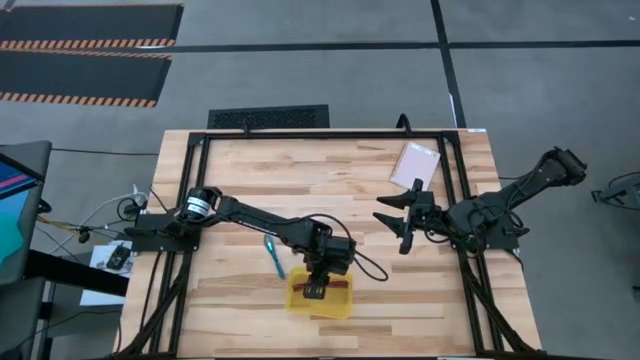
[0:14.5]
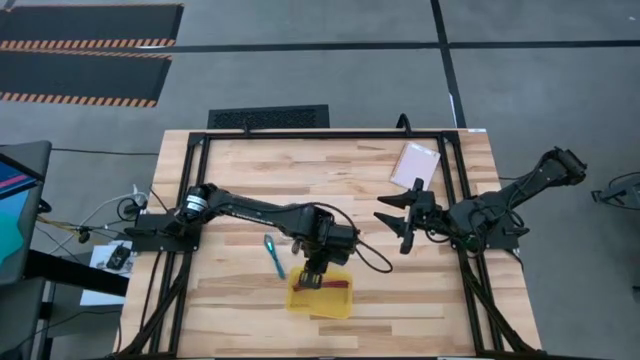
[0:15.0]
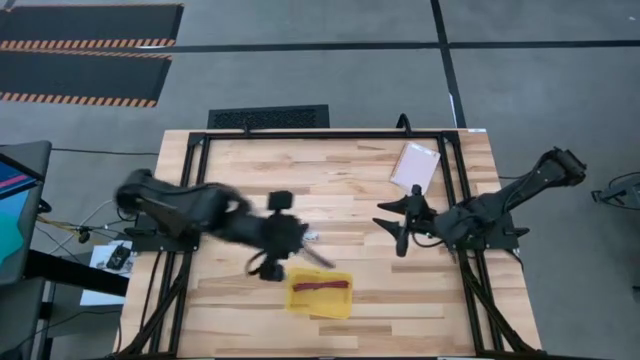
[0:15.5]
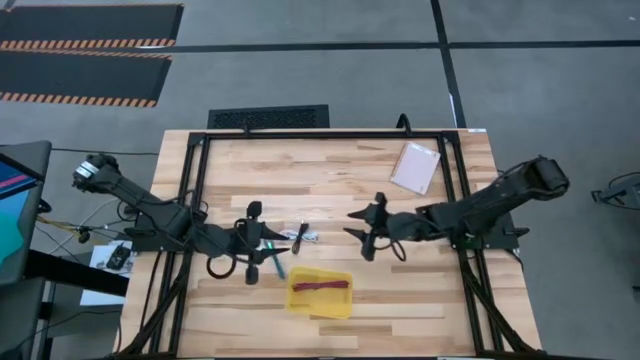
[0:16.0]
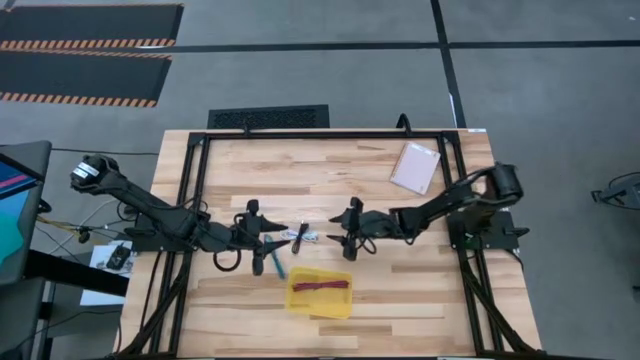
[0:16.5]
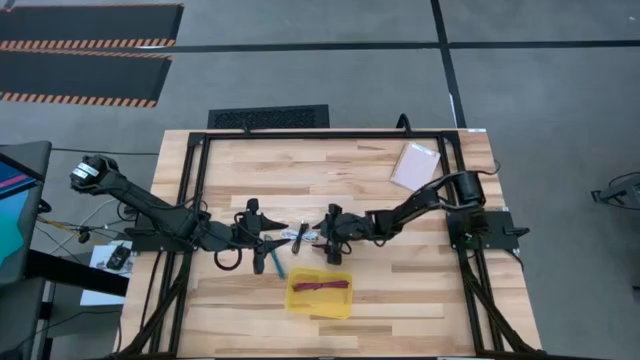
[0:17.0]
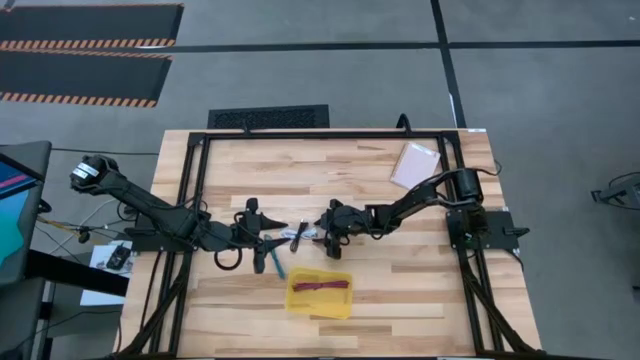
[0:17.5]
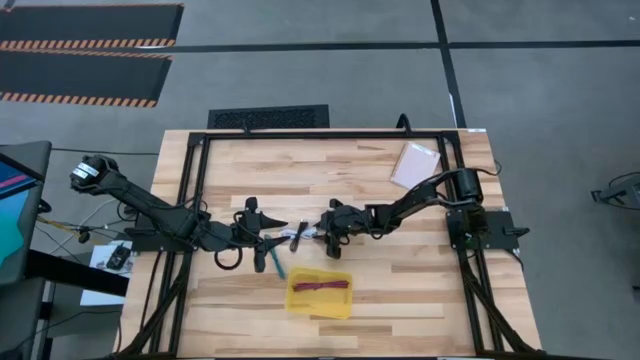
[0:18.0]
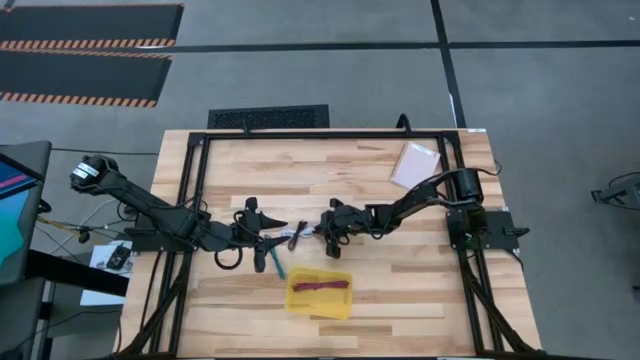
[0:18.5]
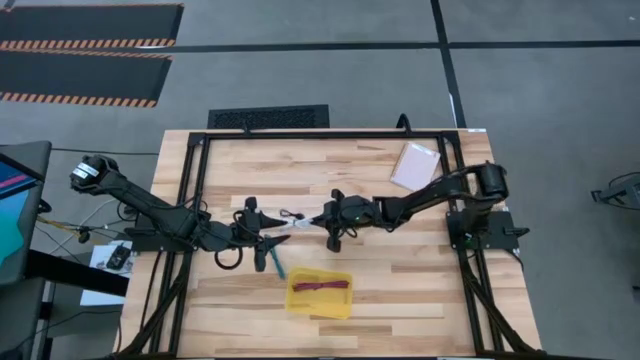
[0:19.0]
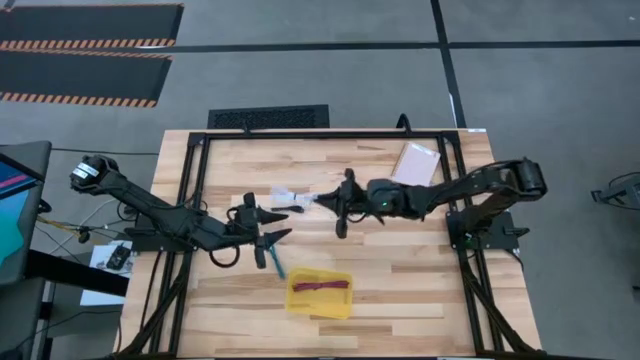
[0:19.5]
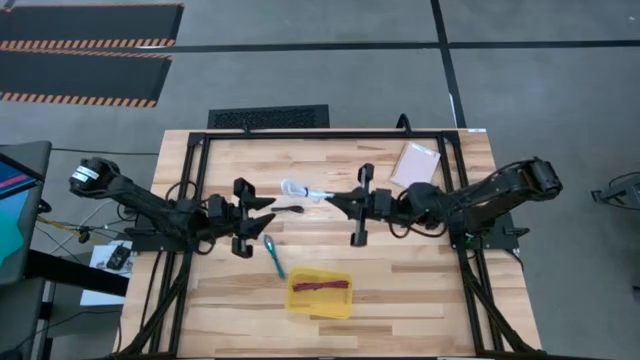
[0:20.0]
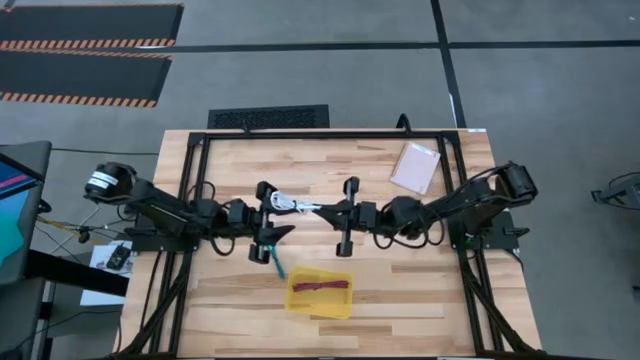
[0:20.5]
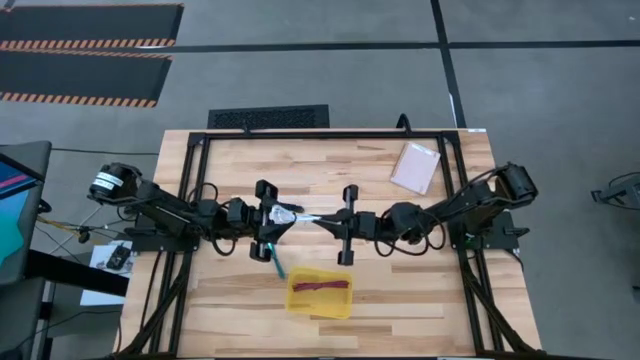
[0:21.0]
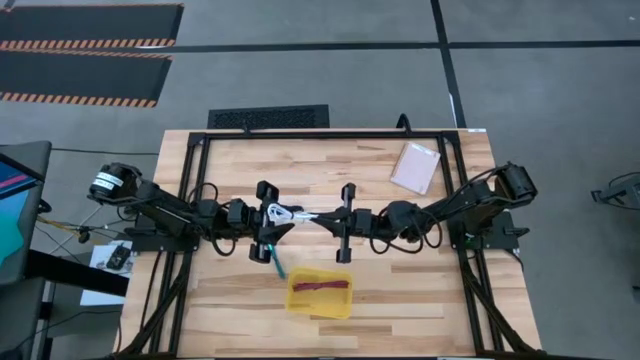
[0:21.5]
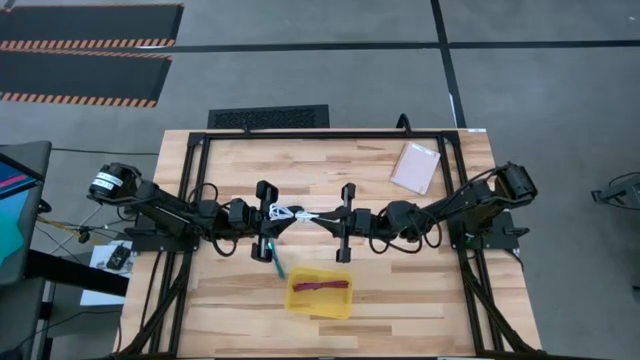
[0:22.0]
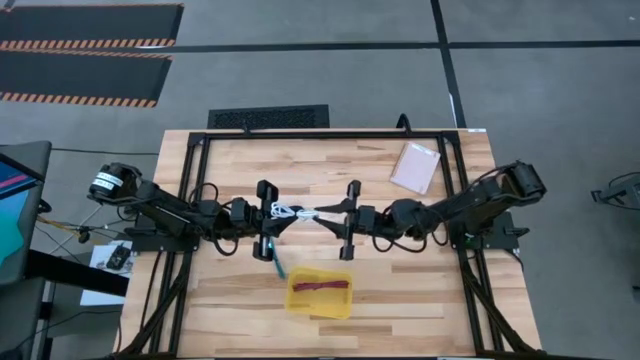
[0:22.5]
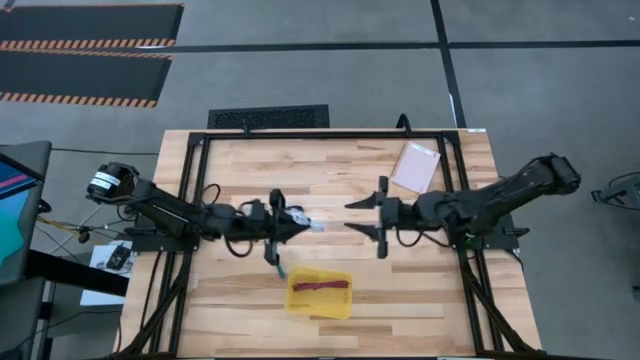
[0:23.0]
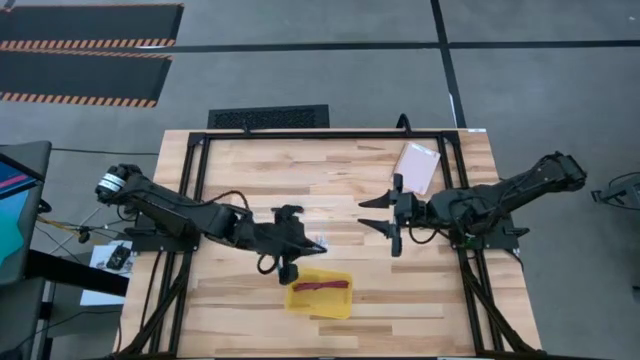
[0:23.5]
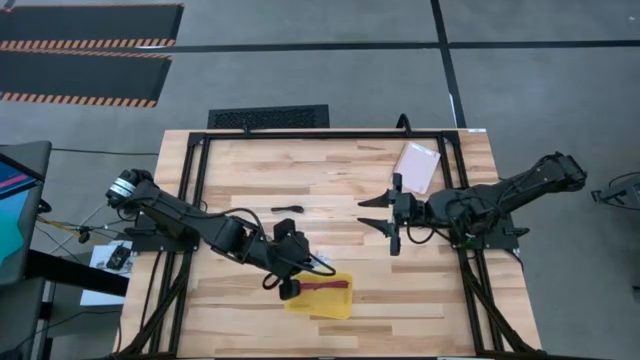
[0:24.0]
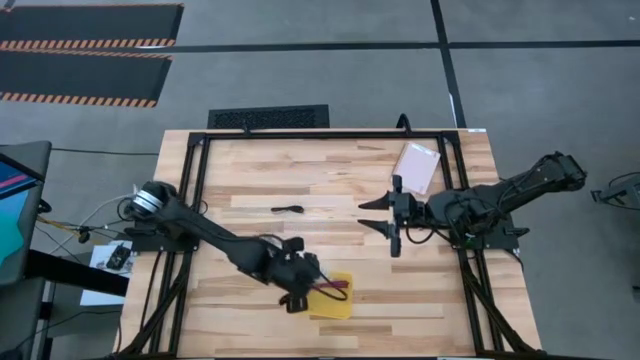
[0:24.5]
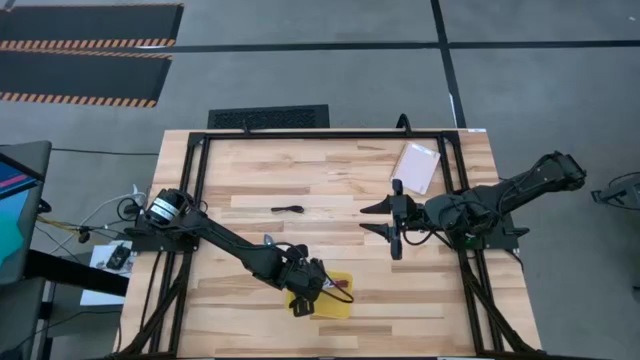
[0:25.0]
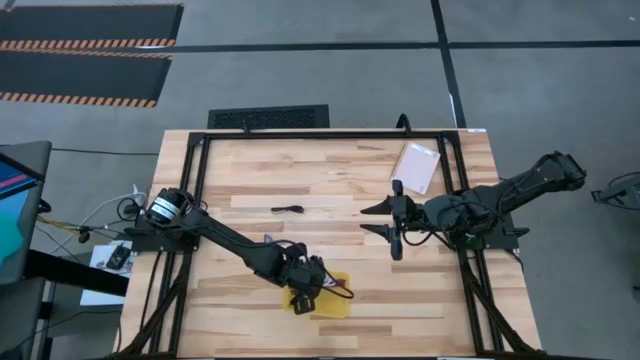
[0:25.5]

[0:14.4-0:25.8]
Task: Pick and place USB-C Cables
Put the white charger cable into the yellow bin

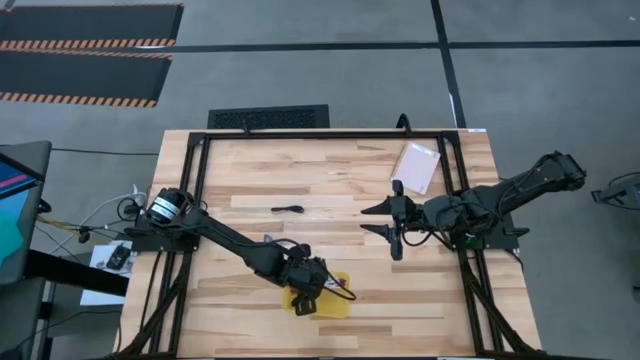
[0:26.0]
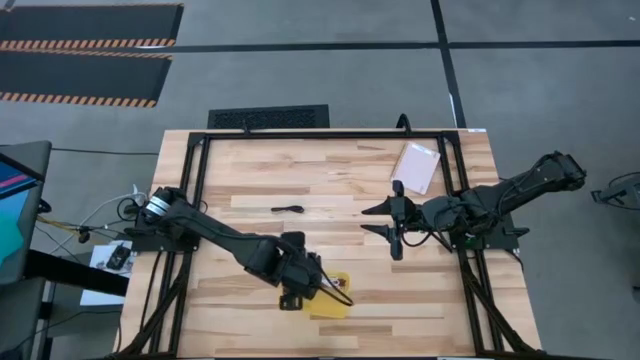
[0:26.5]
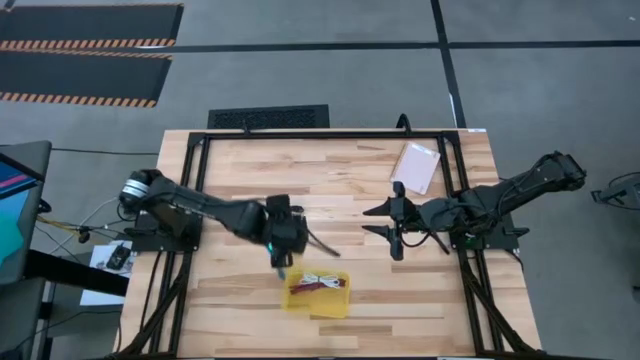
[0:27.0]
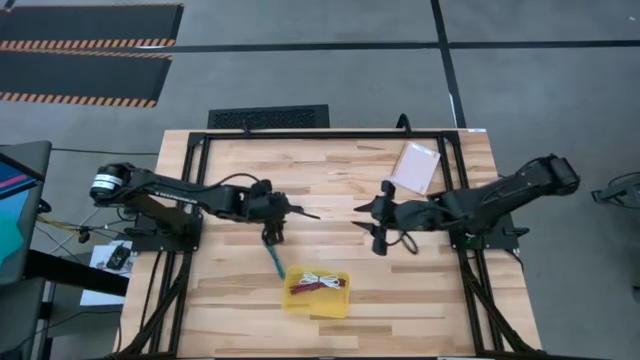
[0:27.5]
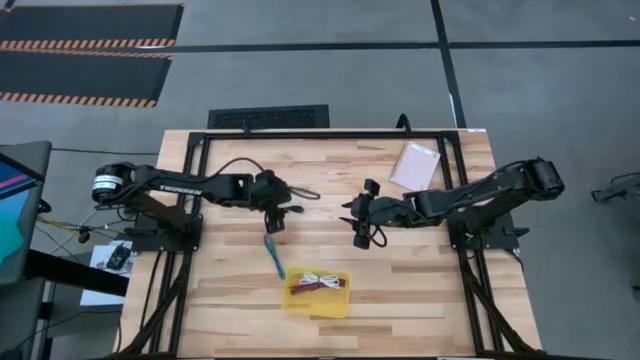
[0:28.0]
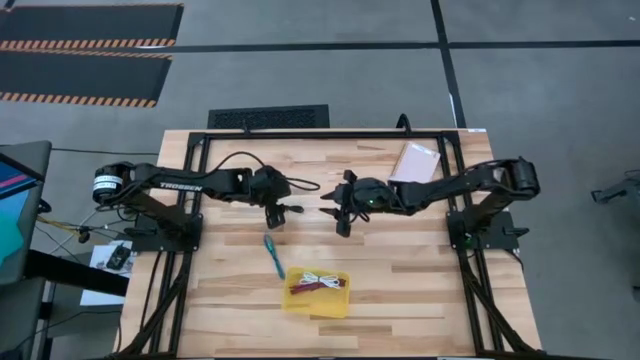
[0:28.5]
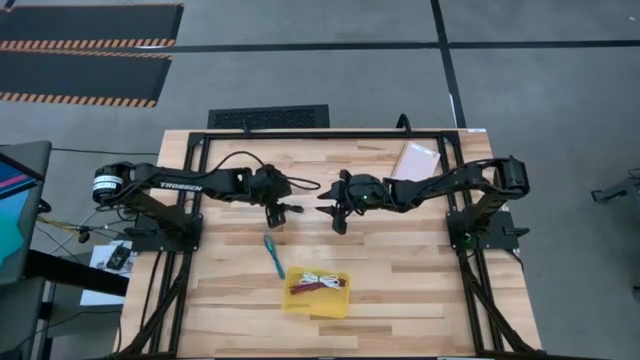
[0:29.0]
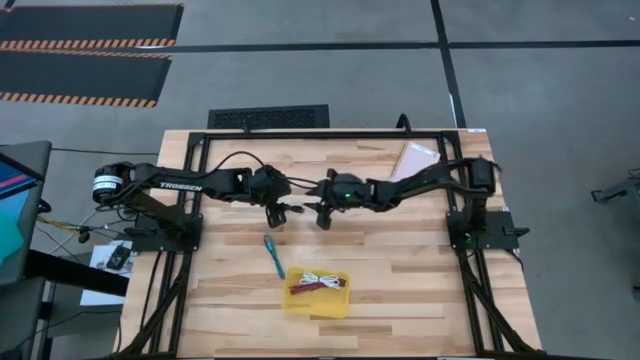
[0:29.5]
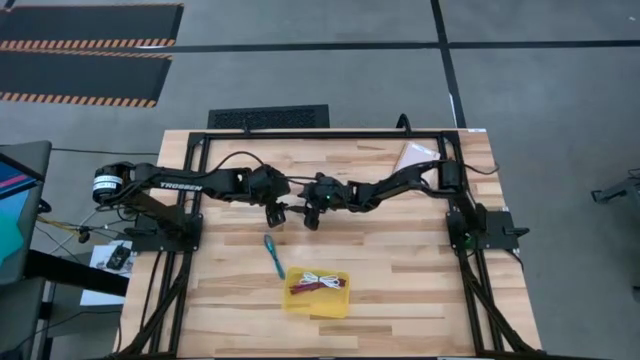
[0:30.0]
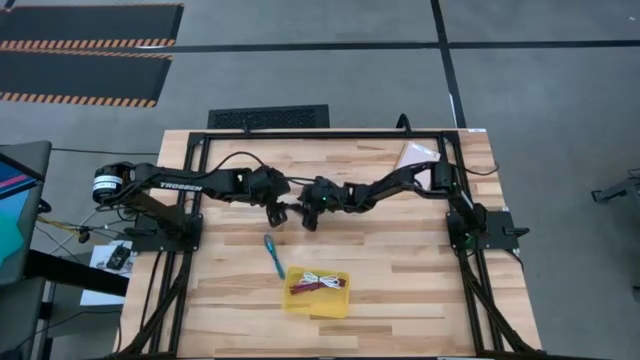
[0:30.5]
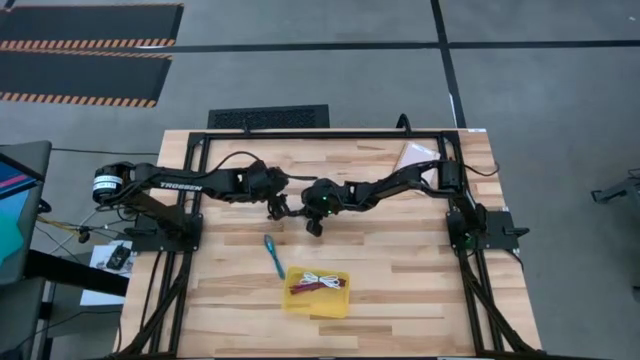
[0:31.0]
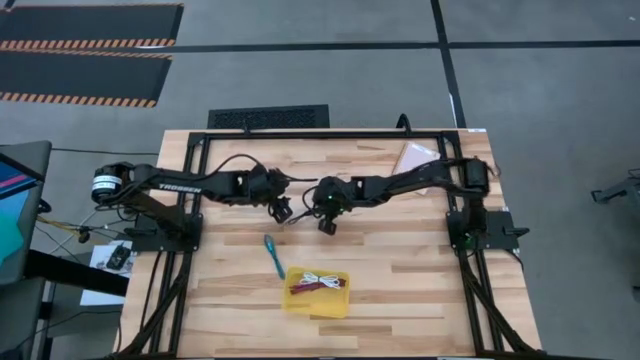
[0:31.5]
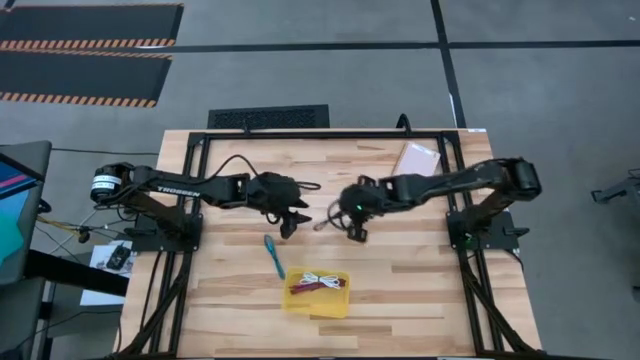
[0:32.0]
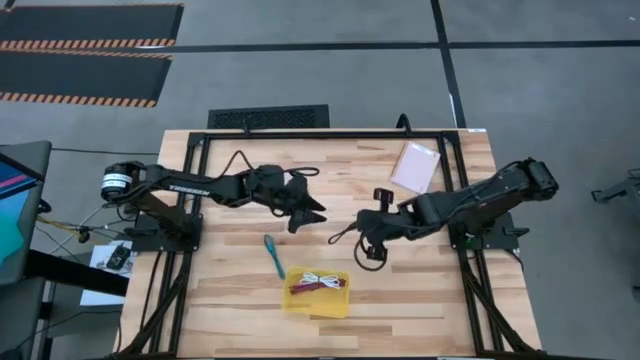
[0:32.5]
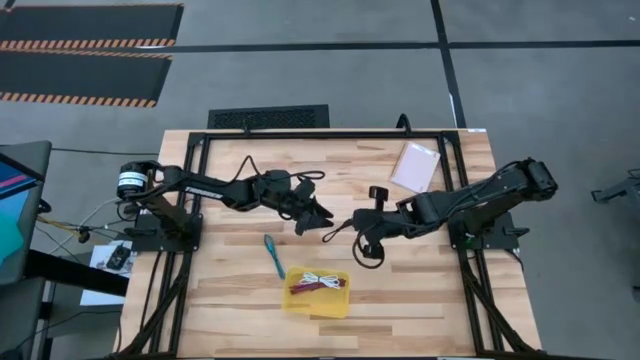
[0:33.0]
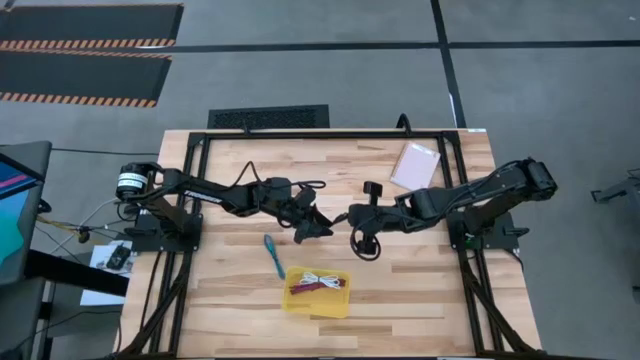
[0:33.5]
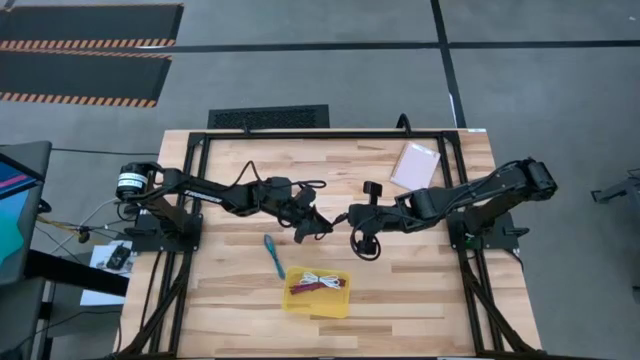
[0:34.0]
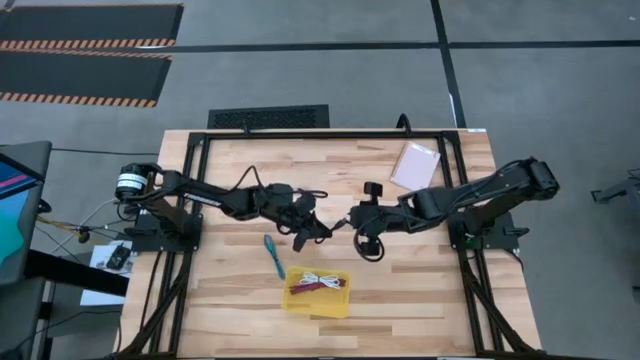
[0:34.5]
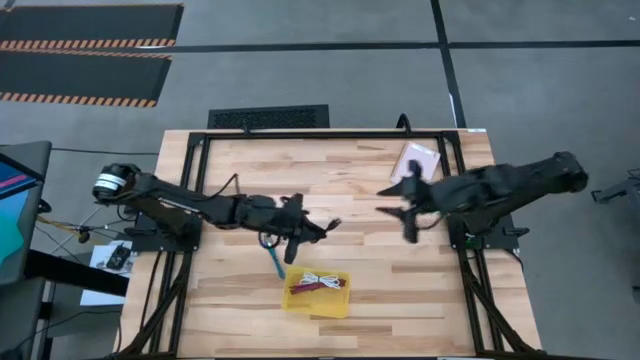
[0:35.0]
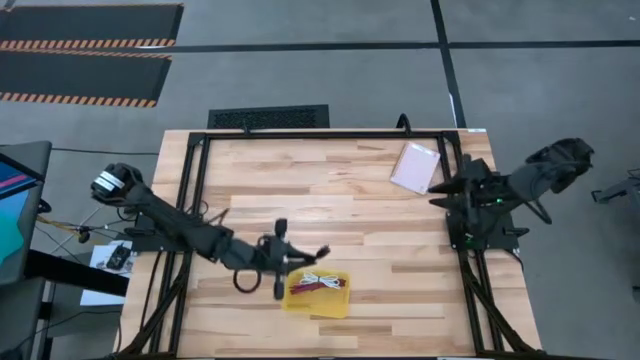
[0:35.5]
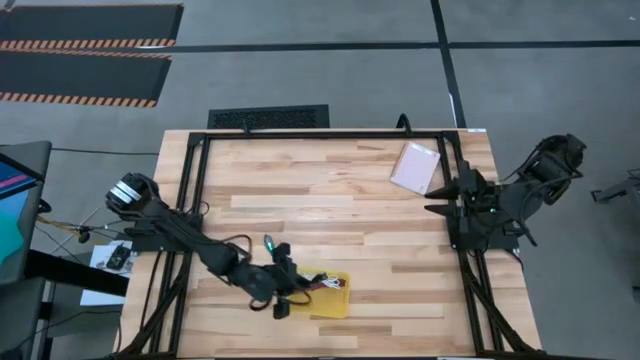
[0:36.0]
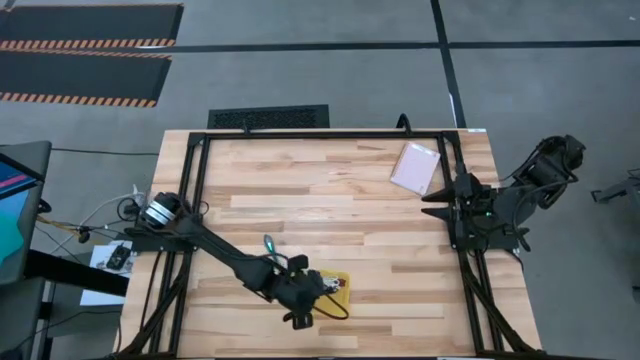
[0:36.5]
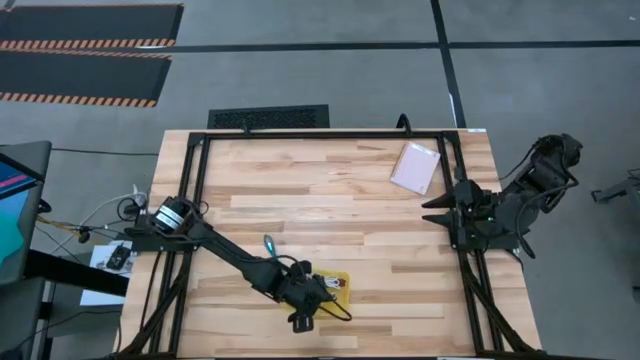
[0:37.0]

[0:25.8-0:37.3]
Put the black charger cable into the yellow bin
